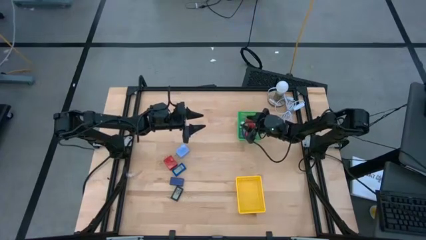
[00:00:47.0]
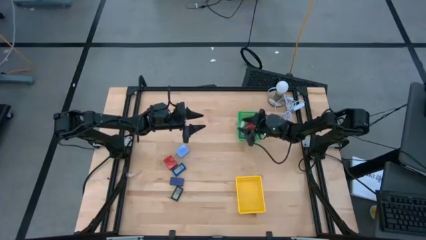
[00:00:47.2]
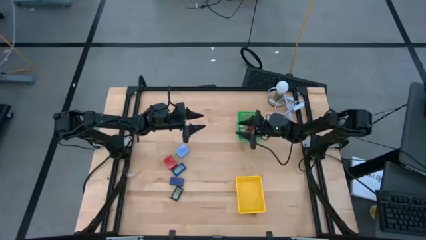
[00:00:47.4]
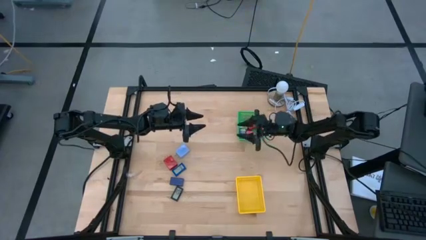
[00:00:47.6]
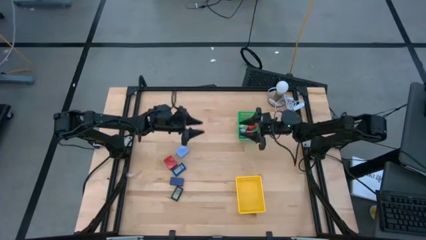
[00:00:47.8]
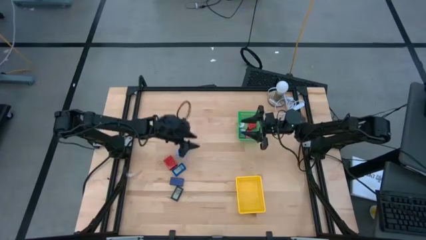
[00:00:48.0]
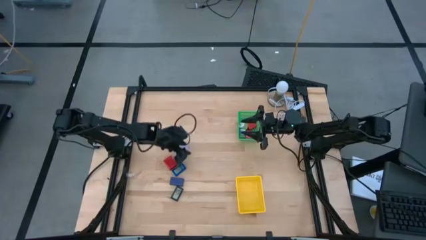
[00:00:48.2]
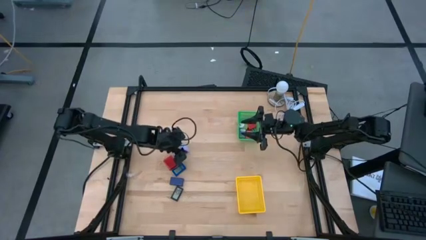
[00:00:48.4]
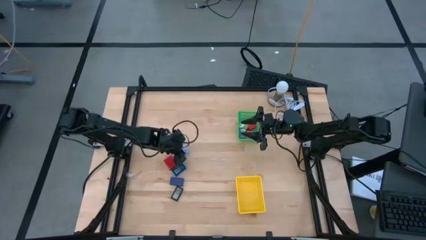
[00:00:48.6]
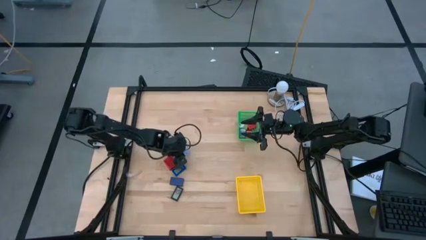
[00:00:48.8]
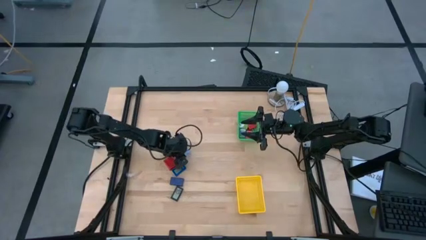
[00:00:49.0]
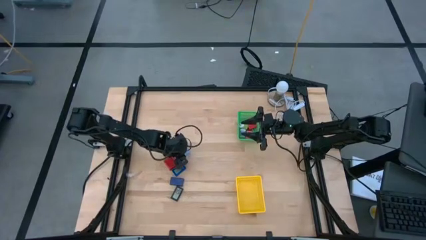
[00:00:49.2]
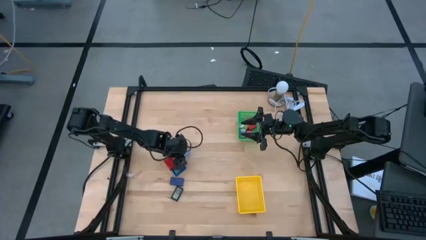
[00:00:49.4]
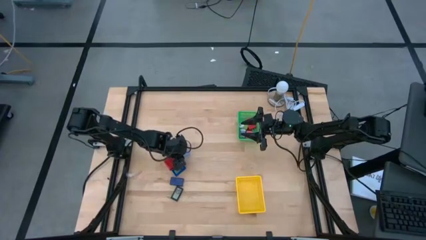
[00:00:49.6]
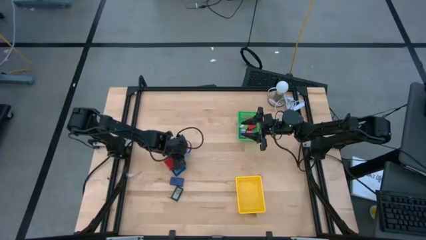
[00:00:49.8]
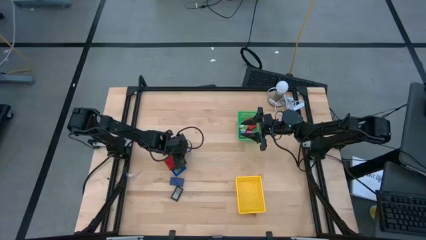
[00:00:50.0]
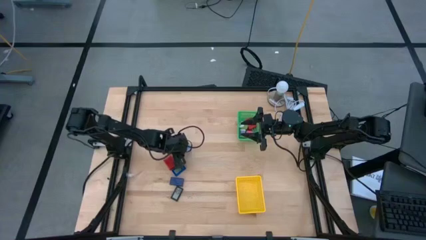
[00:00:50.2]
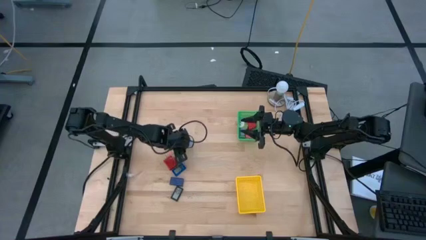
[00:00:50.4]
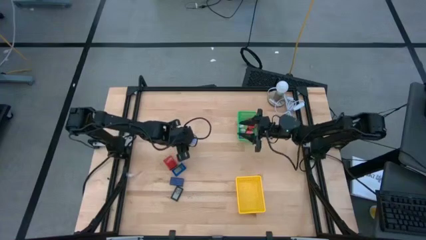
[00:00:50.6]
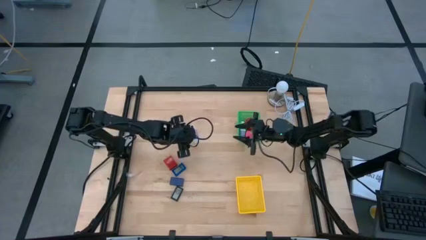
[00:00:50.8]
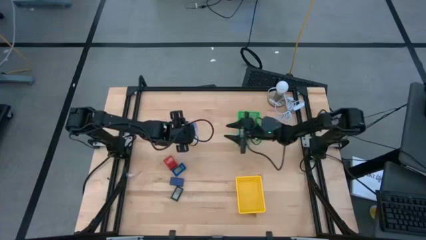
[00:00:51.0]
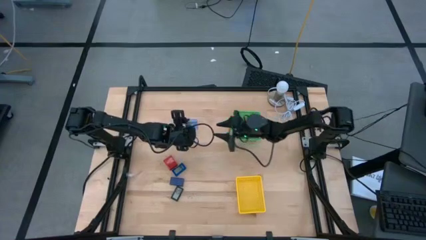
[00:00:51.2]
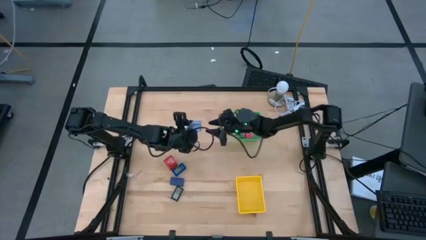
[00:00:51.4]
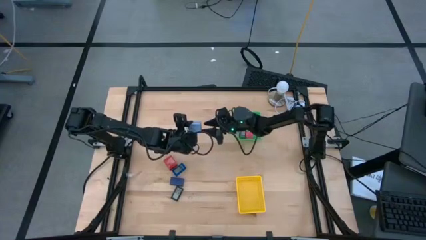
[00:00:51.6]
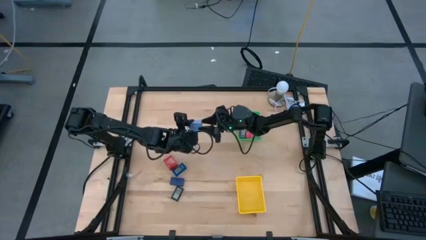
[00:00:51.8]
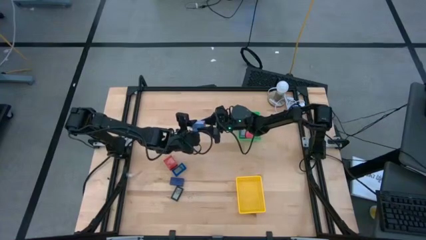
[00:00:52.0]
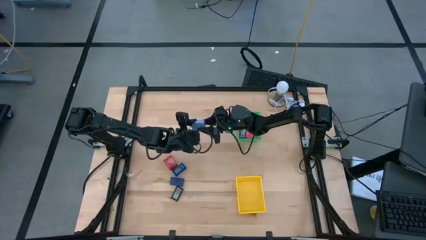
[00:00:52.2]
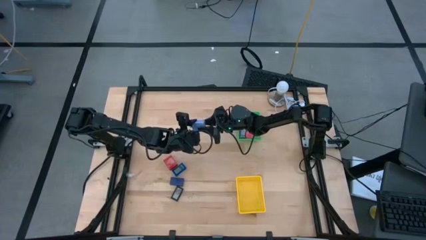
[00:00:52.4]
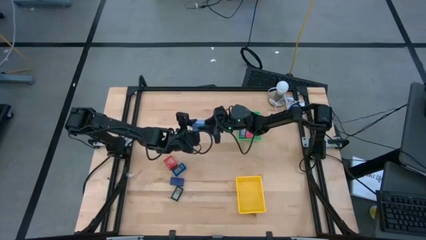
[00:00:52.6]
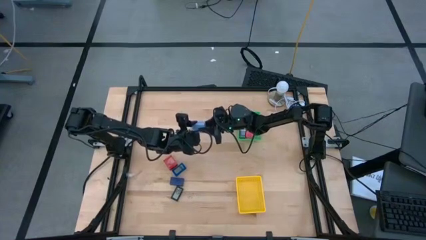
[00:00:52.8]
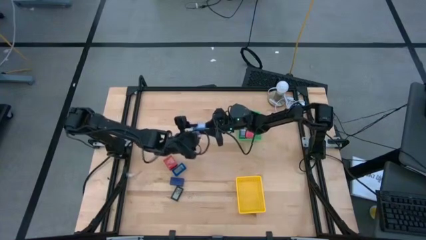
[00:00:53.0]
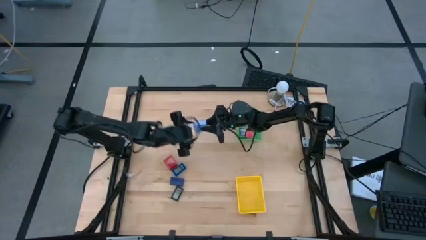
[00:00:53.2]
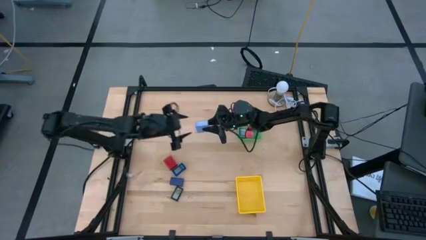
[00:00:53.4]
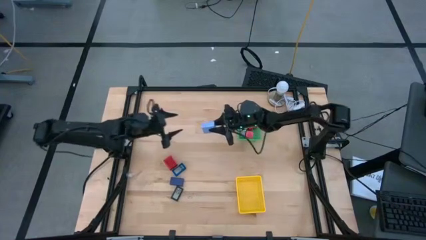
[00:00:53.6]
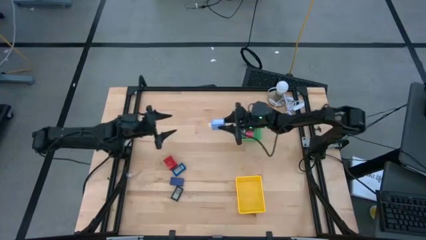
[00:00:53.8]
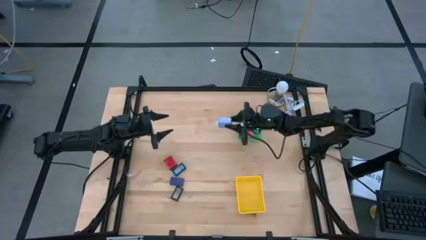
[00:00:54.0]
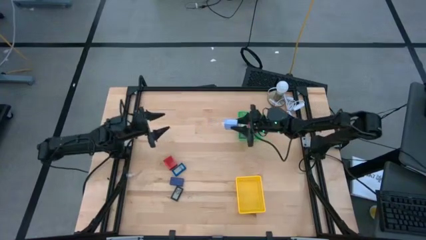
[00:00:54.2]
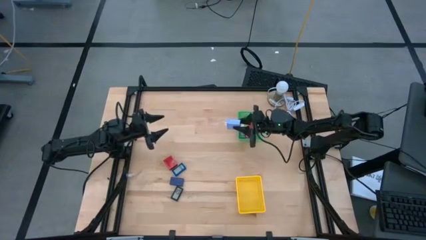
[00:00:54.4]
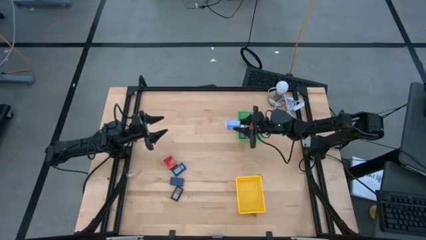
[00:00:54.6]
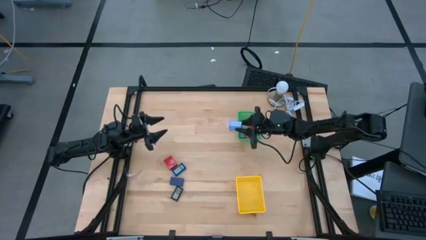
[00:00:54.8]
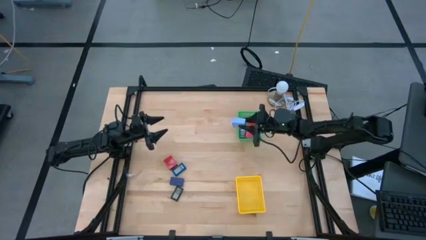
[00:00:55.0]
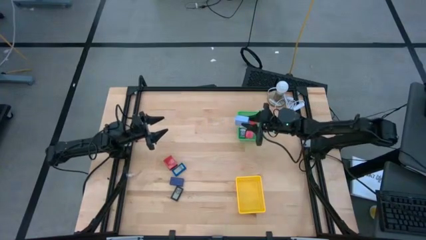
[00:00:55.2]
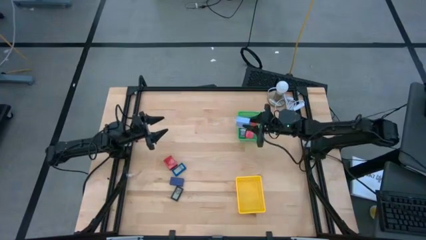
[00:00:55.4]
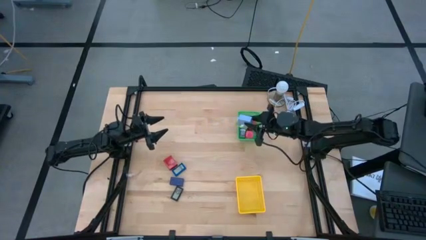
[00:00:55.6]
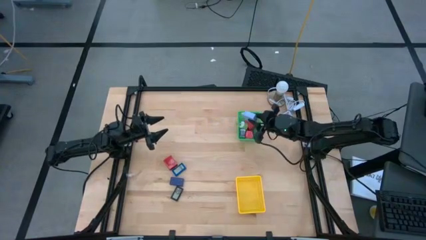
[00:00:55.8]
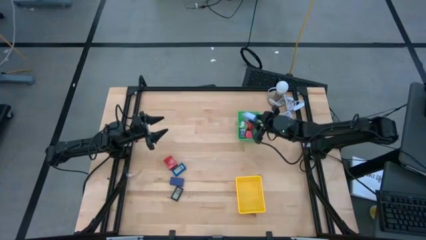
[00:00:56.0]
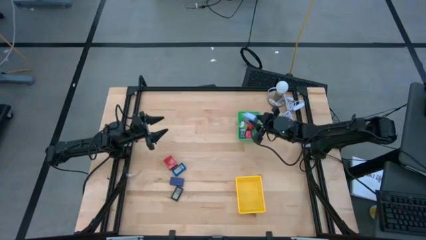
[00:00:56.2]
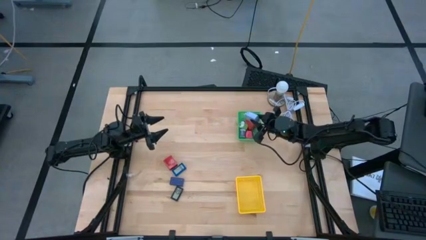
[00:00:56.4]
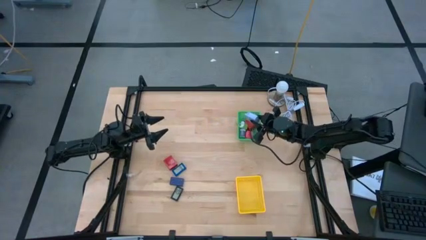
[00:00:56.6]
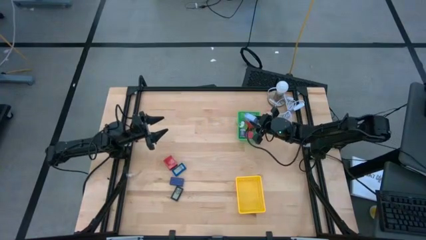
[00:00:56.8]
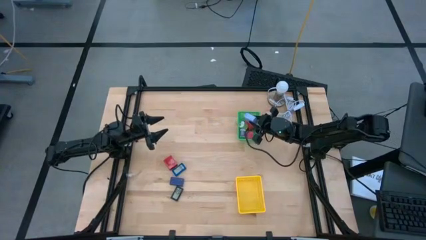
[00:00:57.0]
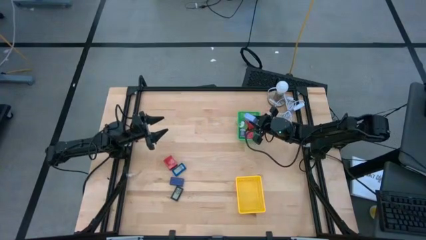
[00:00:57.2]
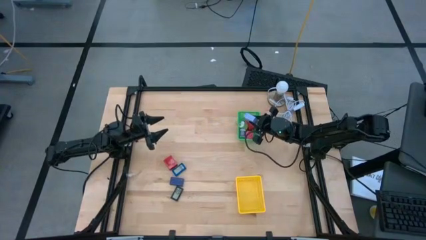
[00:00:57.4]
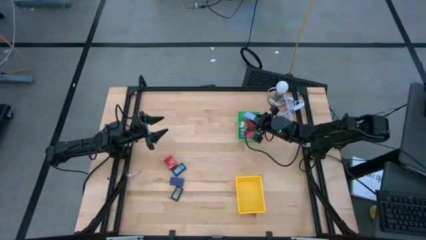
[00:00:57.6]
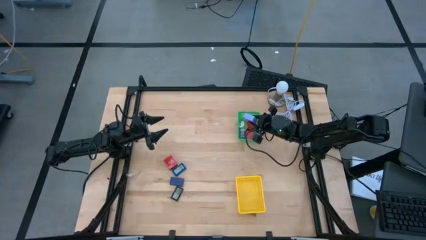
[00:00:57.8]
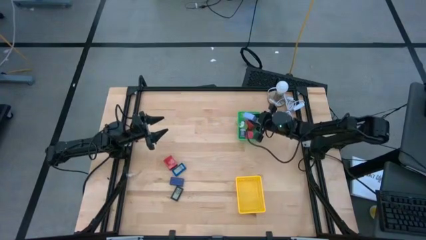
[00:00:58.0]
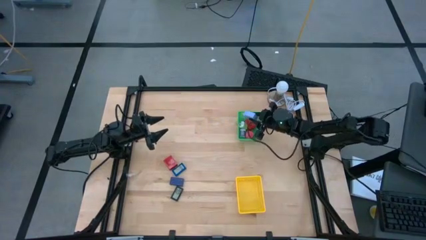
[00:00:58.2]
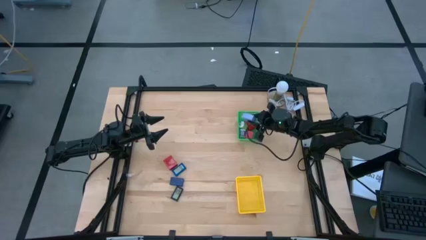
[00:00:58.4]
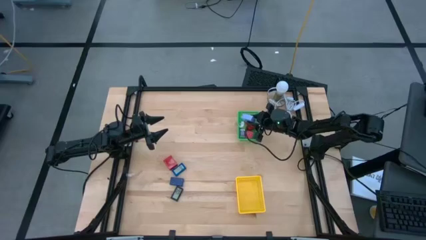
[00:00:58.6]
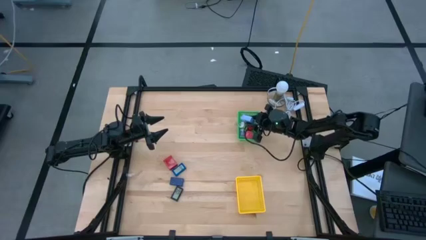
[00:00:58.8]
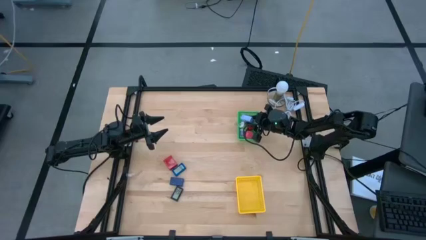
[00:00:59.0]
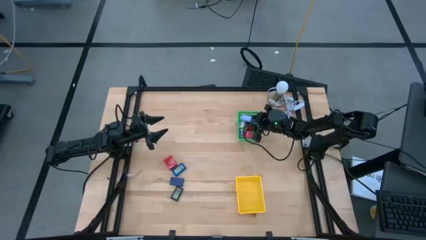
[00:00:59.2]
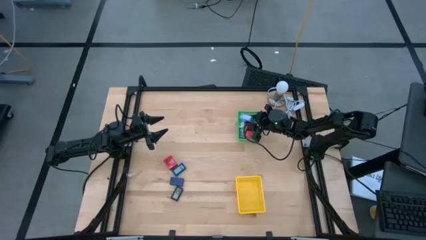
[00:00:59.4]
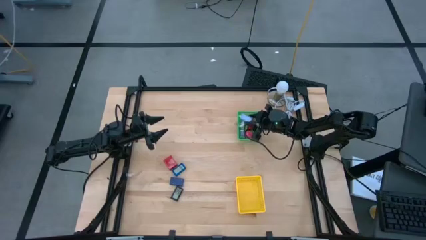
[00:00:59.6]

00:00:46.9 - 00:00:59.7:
Task: Pick & Place Office items
Put the blue charger adapter into the green bin
